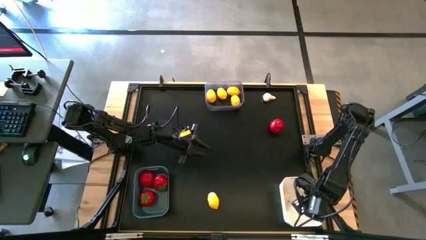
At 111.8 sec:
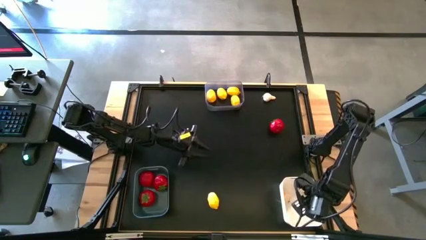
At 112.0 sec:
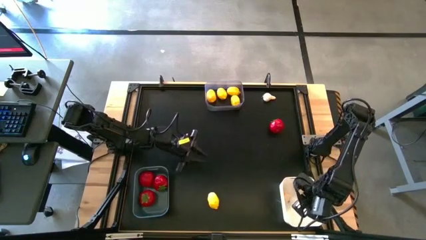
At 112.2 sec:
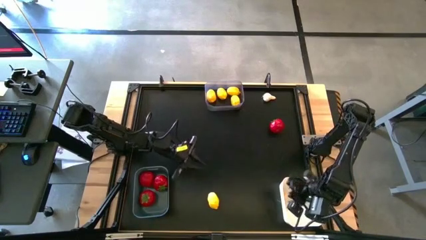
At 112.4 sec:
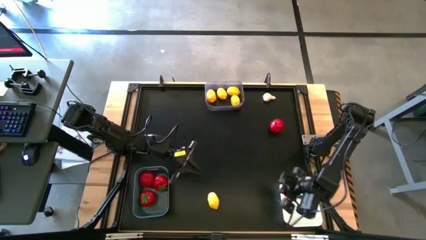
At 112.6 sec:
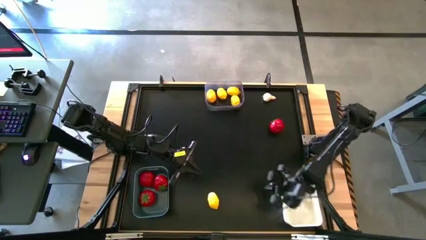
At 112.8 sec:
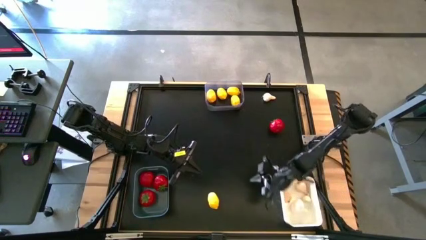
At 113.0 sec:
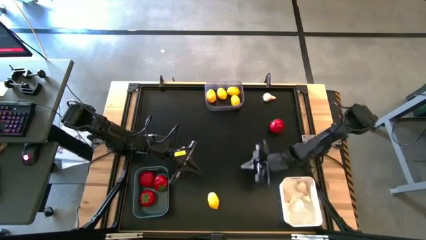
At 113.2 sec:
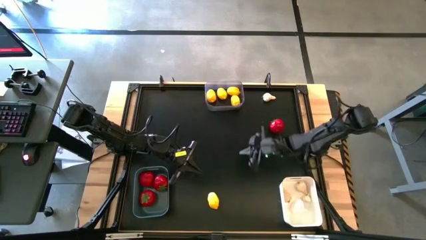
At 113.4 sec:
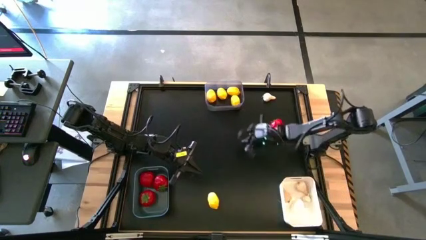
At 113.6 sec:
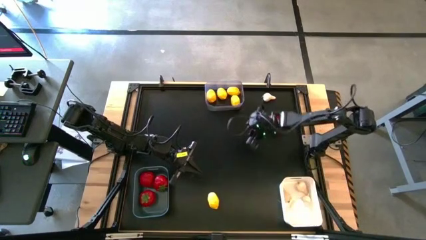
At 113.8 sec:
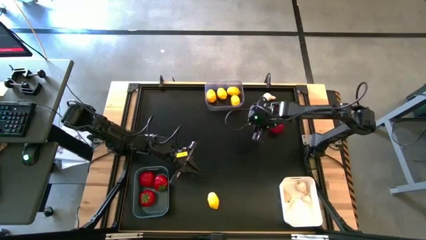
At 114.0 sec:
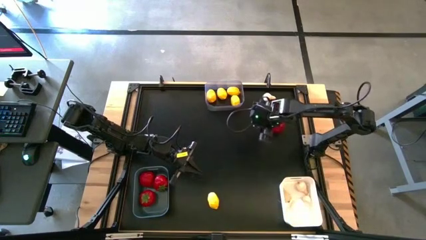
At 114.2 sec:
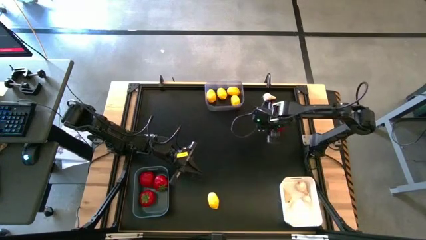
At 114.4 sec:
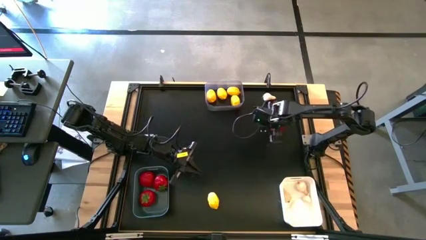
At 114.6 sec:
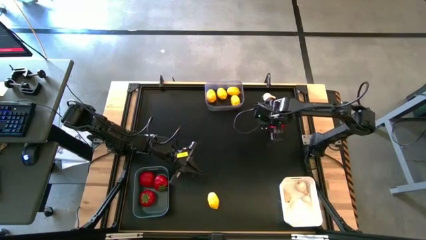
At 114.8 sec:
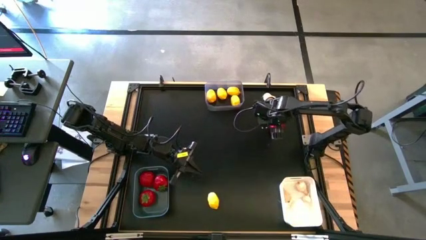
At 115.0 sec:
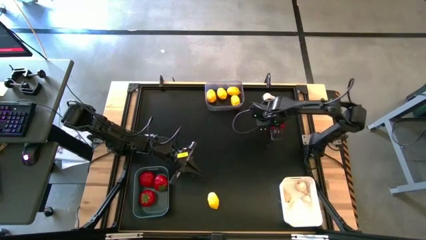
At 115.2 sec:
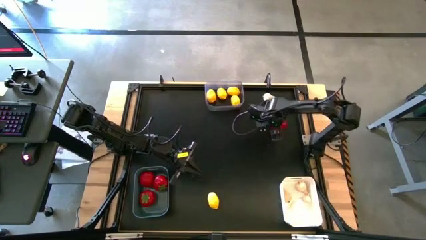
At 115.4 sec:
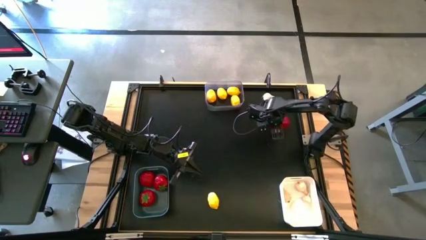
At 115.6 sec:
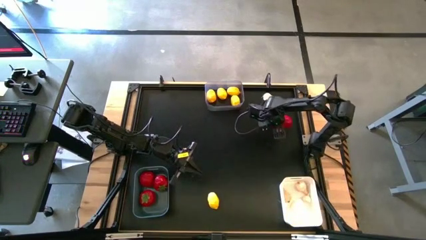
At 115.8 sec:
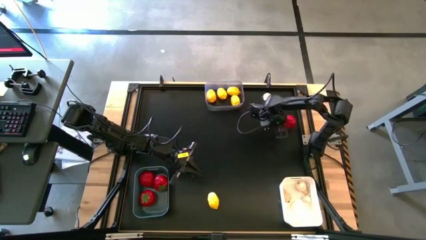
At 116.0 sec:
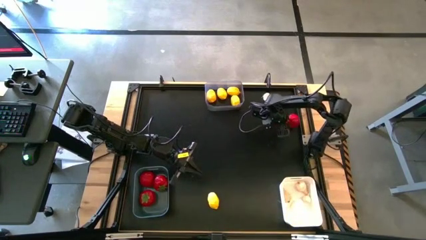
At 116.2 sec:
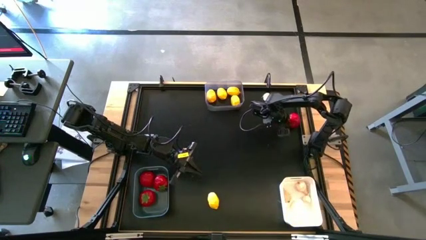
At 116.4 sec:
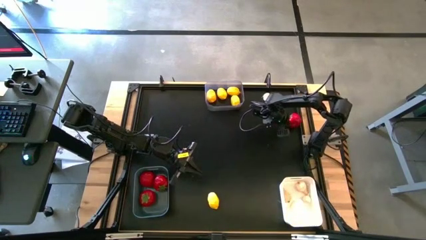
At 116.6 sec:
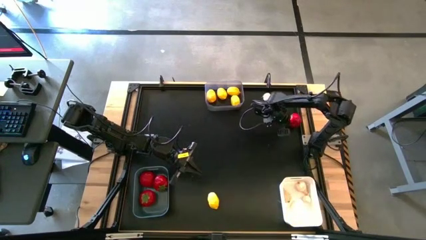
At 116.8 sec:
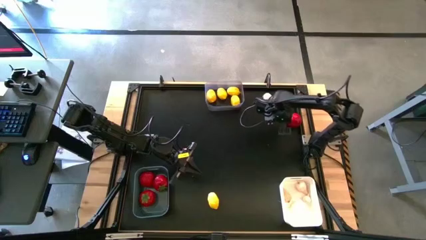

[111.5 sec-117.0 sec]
Task: Sort produce into baskets
Put the tomato into the dark green bin

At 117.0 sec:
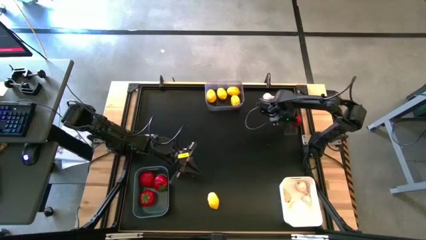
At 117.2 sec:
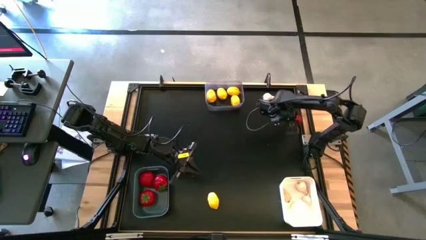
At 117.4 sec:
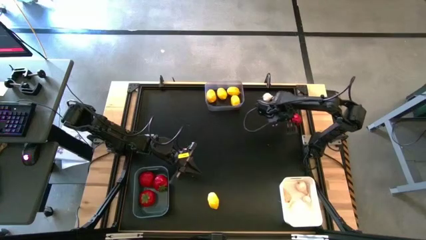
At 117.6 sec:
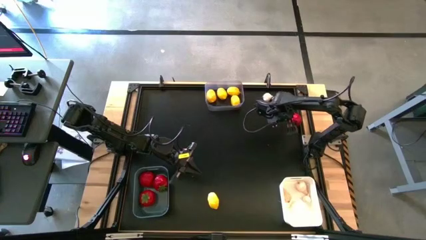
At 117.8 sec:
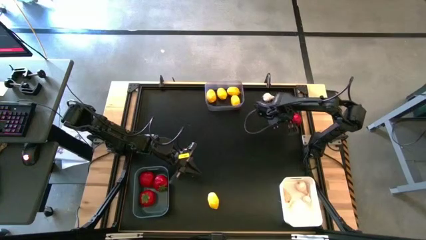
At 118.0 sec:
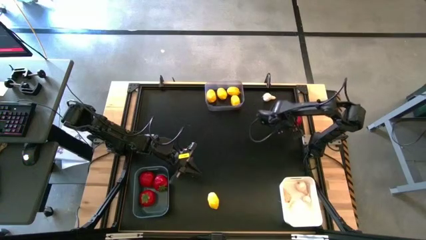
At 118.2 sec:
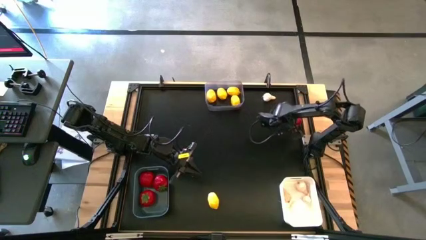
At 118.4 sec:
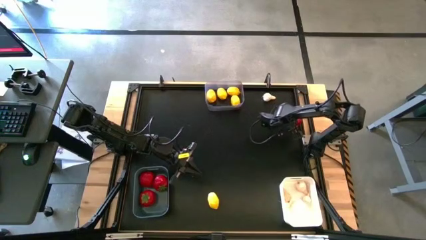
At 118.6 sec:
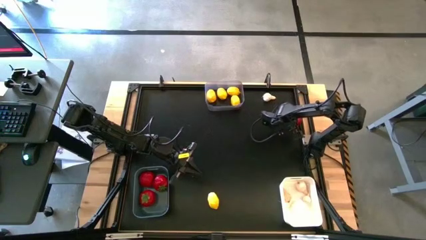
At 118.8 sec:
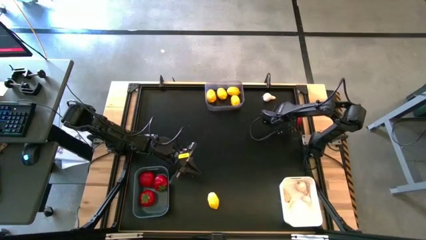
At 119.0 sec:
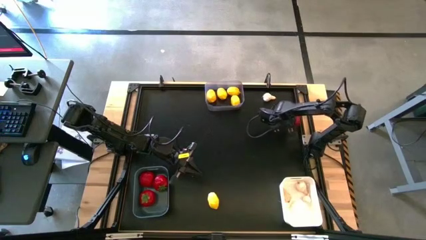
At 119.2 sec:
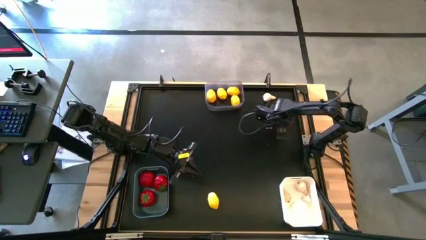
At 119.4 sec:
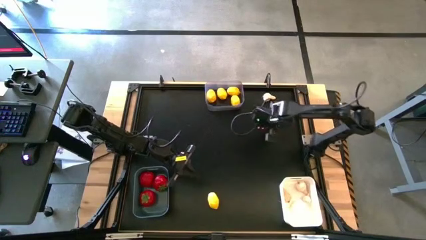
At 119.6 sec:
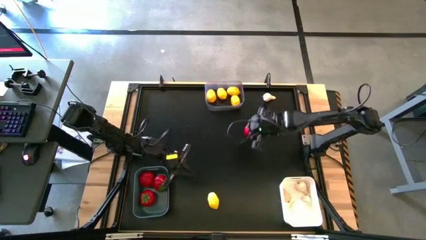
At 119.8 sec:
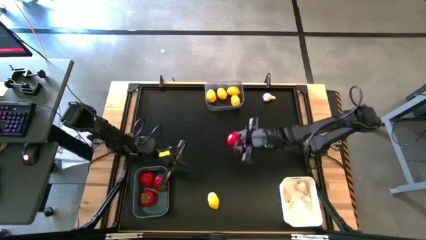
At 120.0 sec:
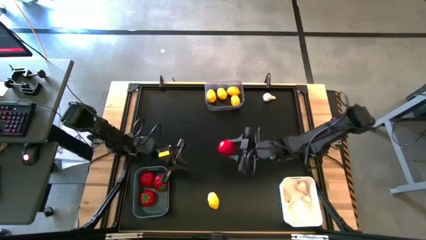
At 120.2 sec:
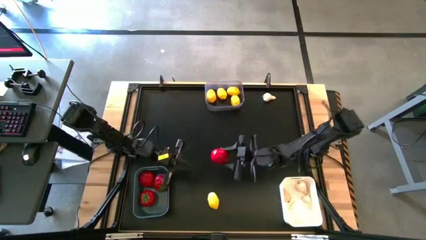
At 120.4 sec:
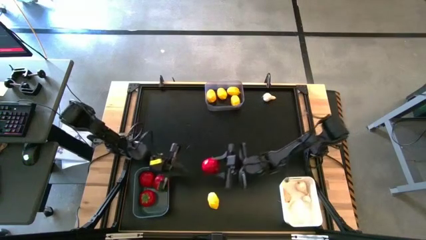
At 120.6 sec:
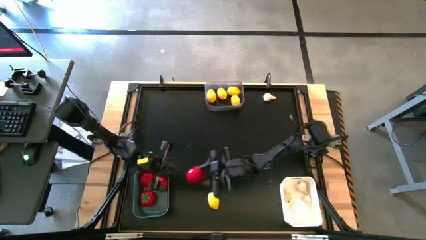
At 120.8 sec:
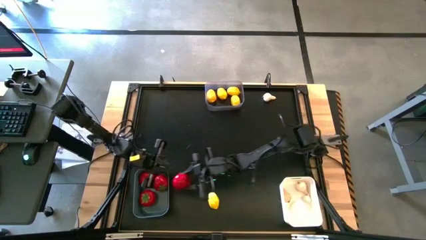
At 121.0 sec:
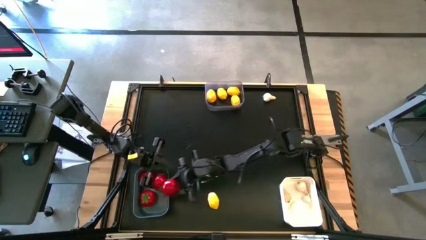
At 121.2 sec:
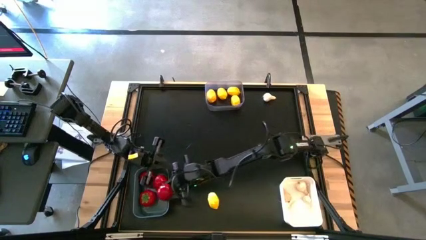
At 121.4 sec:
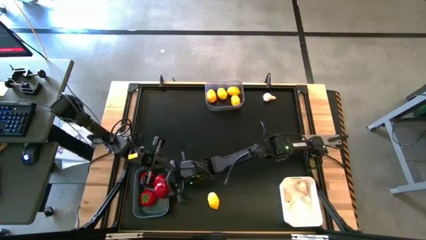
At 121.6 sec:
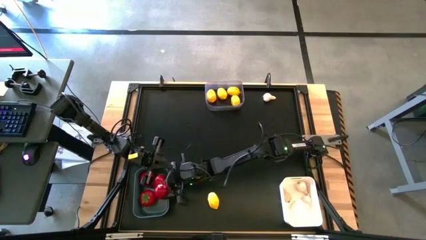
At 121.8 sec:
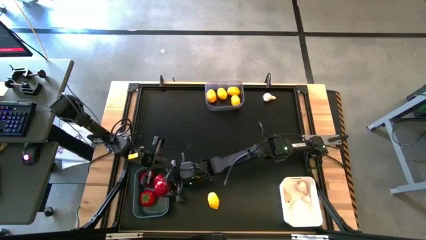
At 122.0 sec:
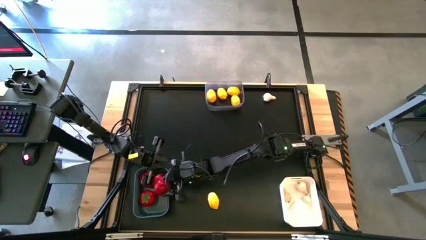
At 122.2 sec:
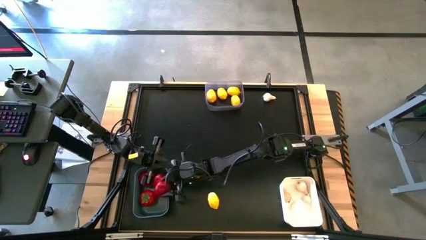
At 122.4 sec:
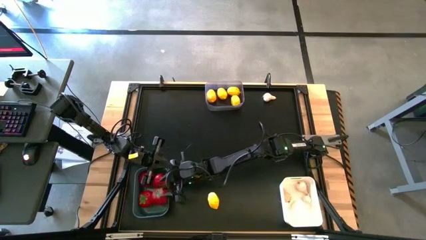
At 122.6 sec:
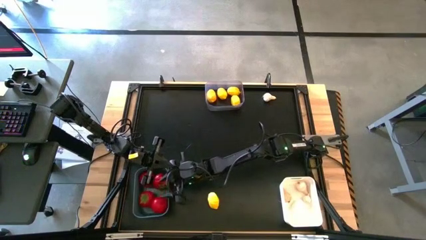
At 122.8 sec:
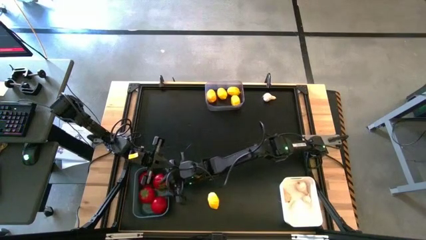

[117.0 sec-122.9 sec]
Put the tomato into the dark green bin

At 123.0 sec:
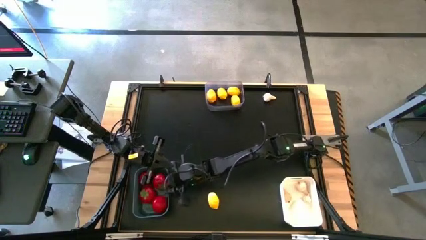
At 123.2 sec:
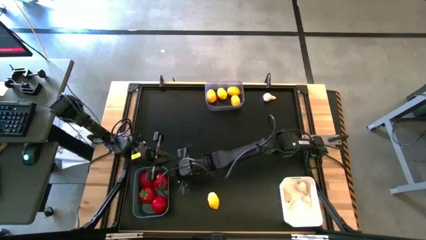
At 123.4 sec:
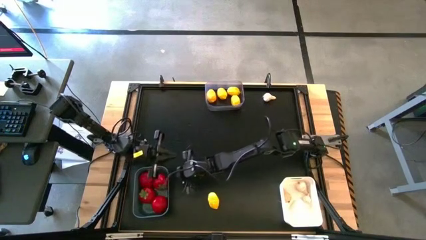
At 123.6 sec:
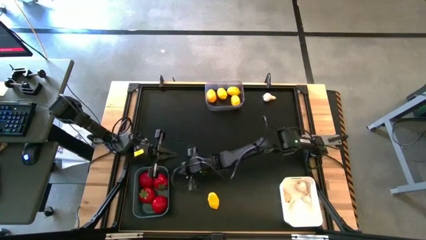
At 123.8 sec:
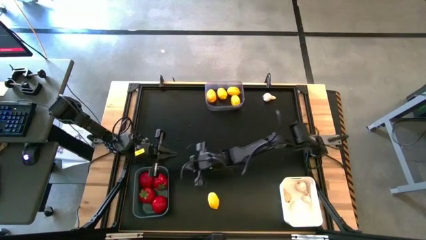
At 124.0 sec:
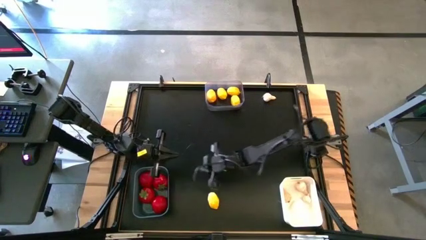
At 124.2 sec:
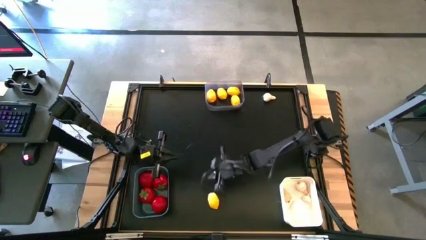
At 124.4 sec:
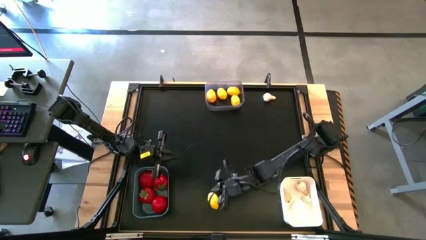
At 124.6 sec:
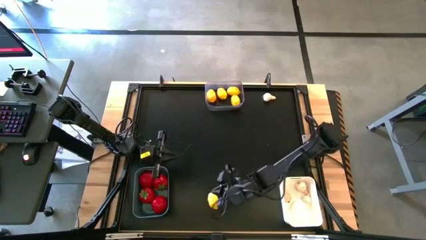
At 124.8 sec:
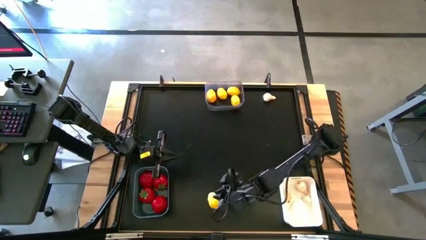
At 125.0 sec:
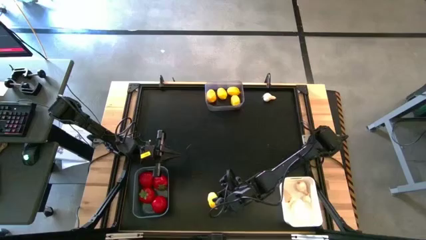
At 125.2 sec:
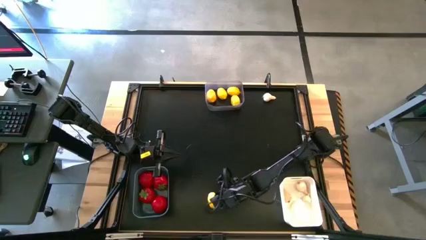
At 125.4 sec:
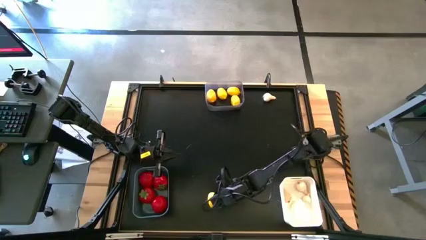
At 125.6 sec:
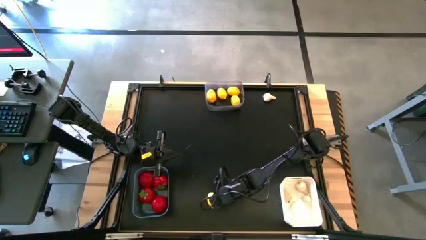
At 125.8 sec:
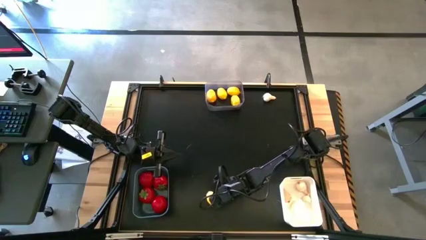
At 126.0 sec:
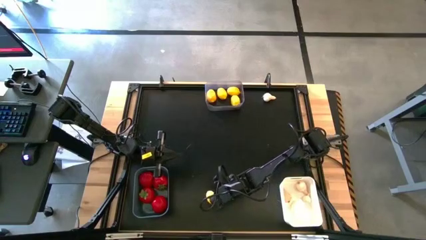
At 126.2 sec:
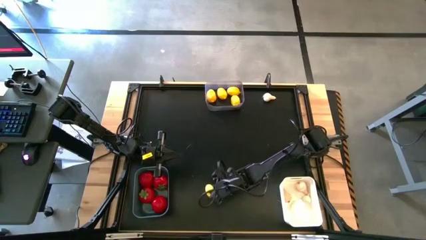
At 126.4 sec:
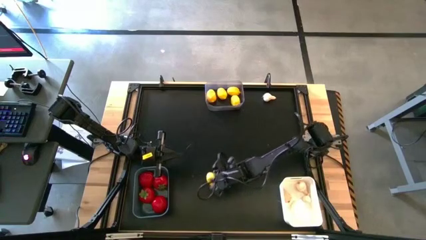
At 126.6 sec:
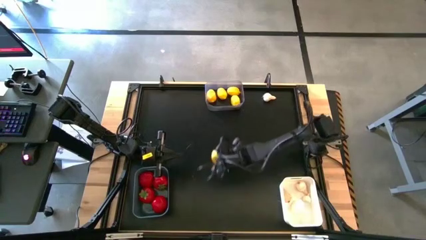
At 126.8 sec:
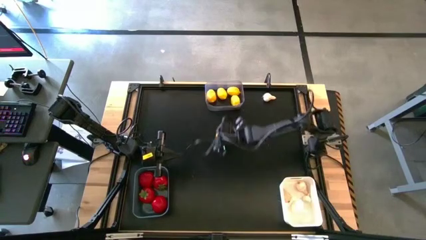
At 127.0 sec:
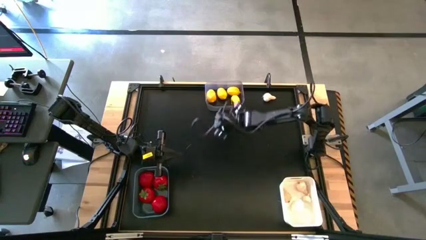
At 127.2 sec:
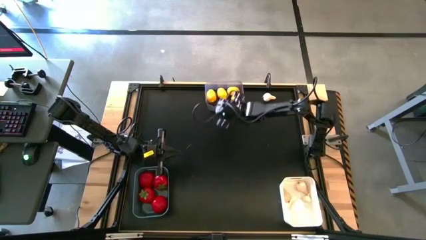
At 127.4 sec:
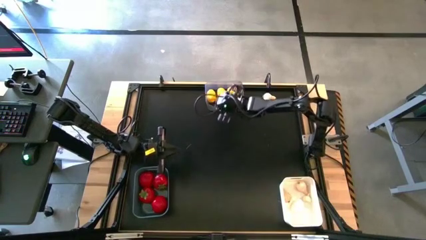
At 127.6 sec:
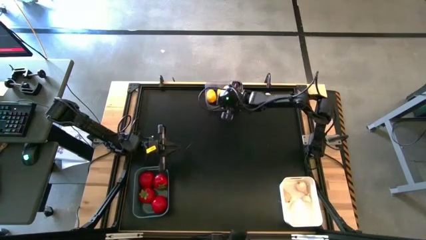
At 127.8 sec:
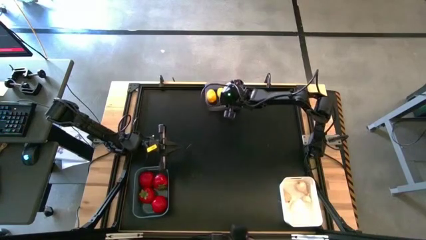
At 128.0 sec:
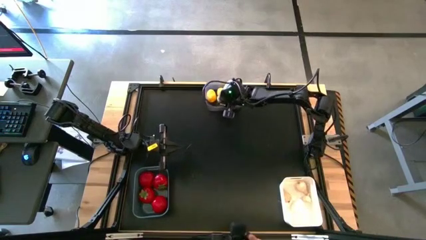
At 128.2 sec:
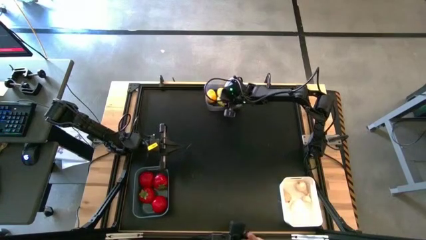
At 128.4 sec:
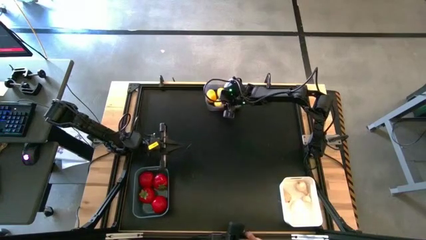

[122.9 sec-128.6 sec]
Put the lemon into the transparent bin
